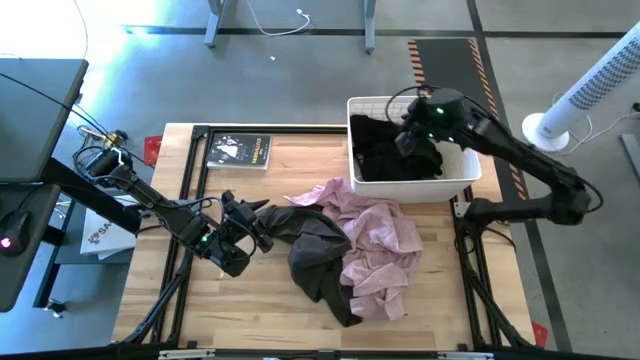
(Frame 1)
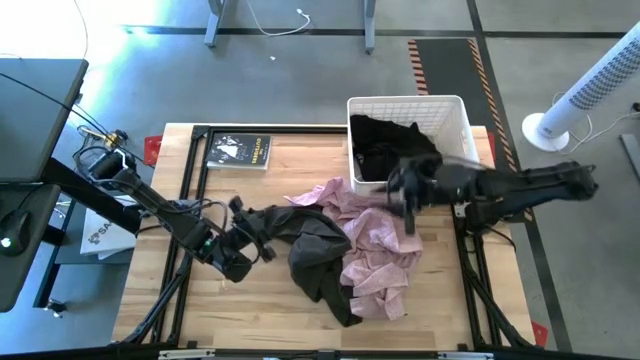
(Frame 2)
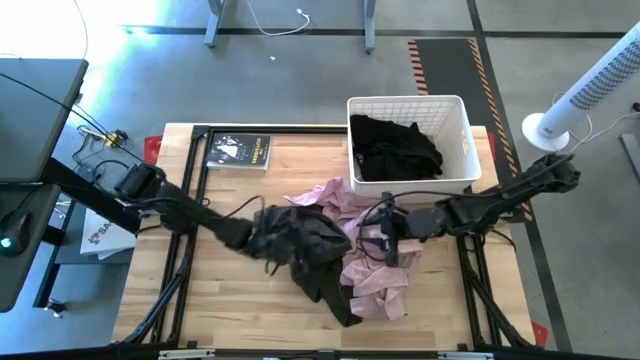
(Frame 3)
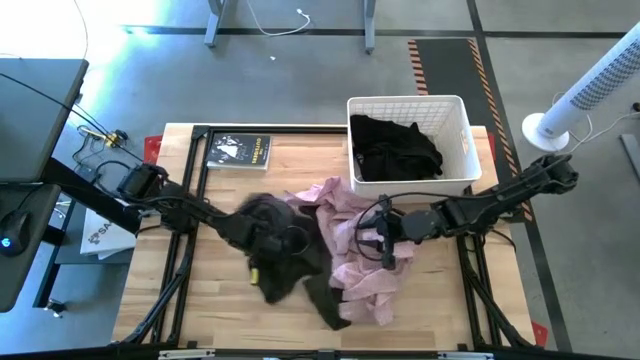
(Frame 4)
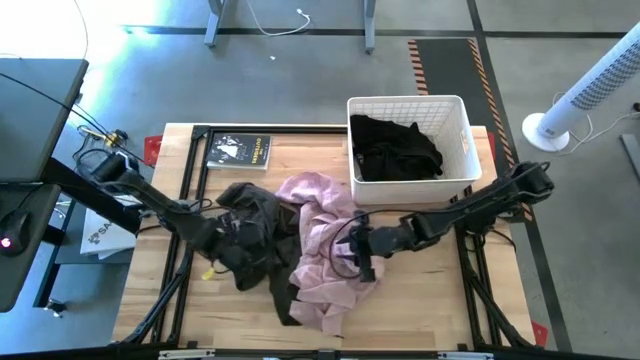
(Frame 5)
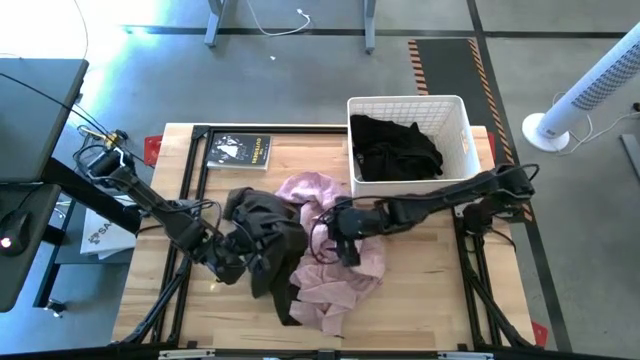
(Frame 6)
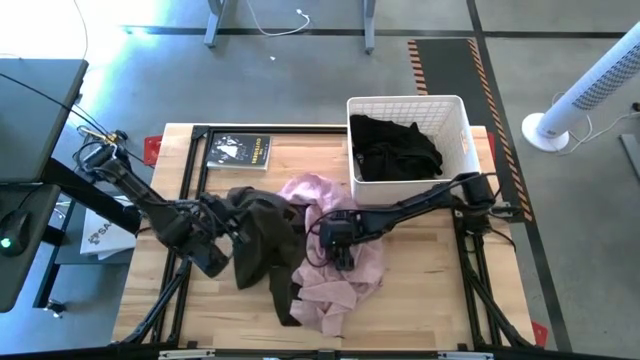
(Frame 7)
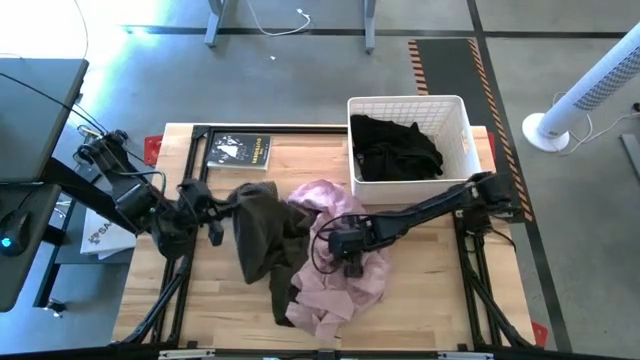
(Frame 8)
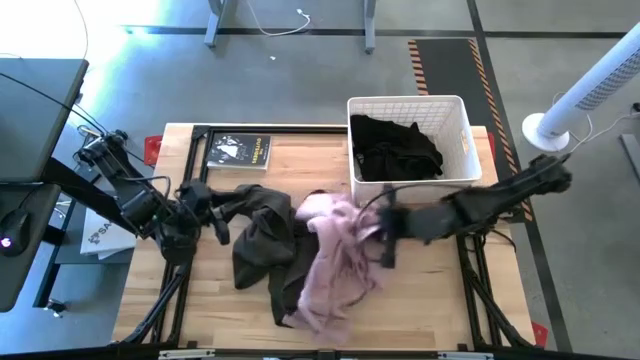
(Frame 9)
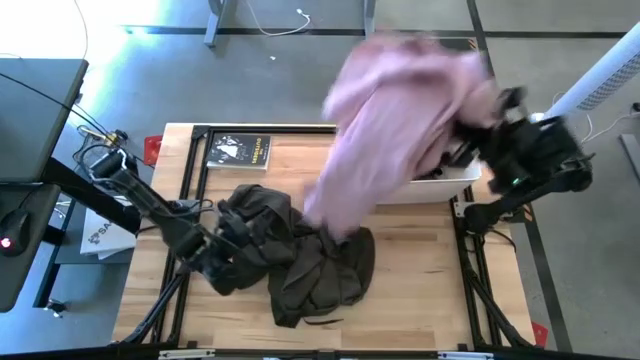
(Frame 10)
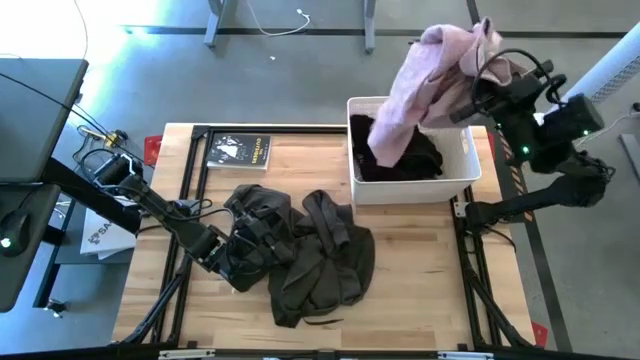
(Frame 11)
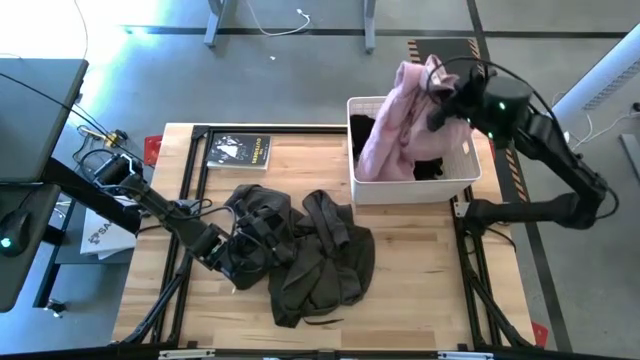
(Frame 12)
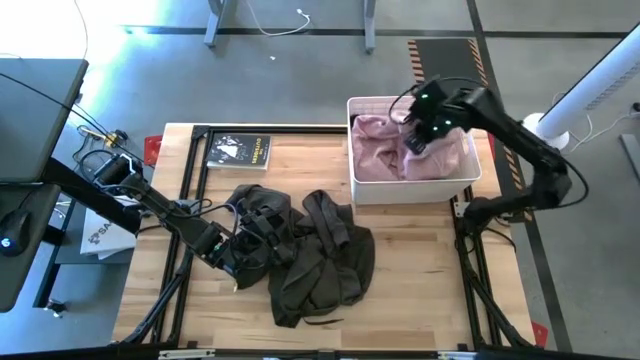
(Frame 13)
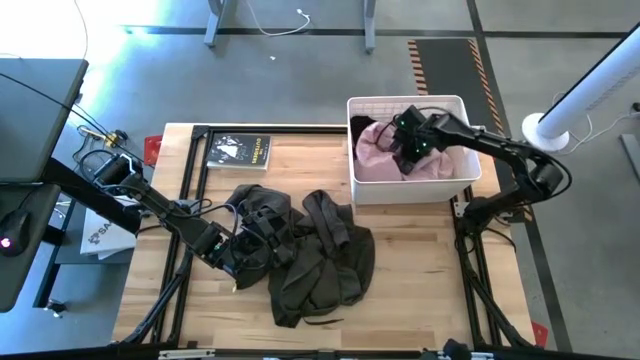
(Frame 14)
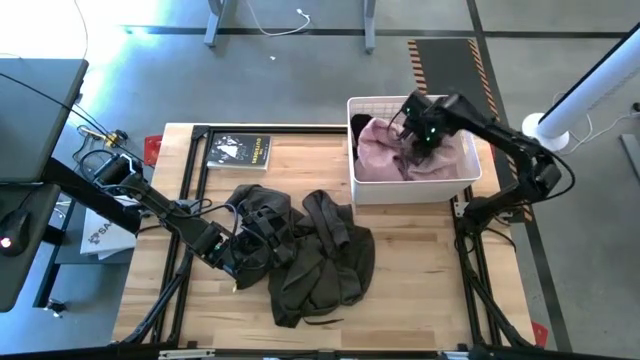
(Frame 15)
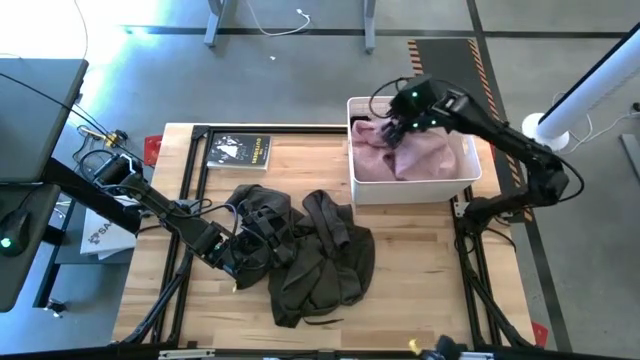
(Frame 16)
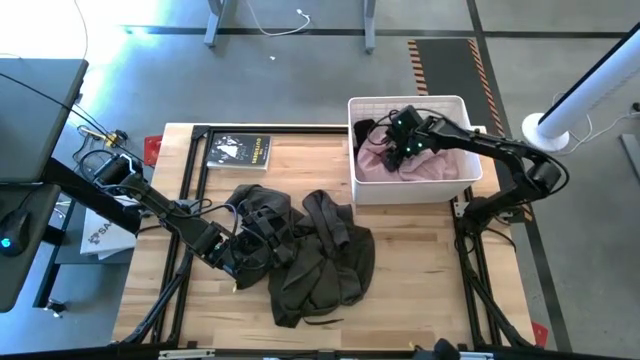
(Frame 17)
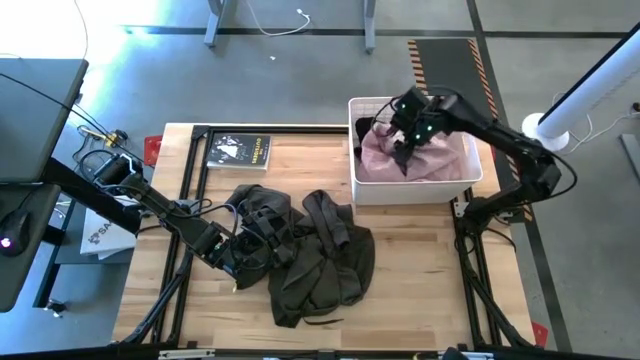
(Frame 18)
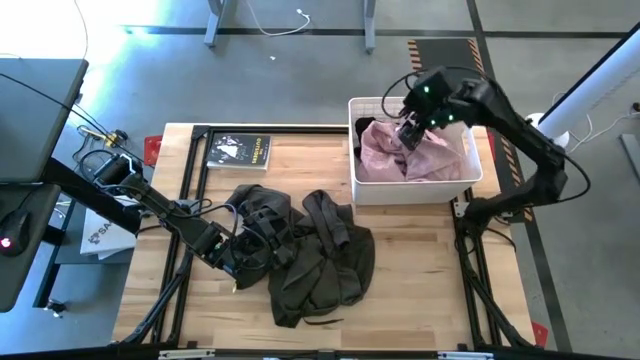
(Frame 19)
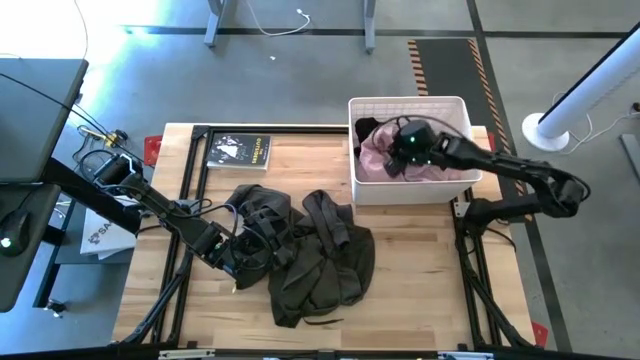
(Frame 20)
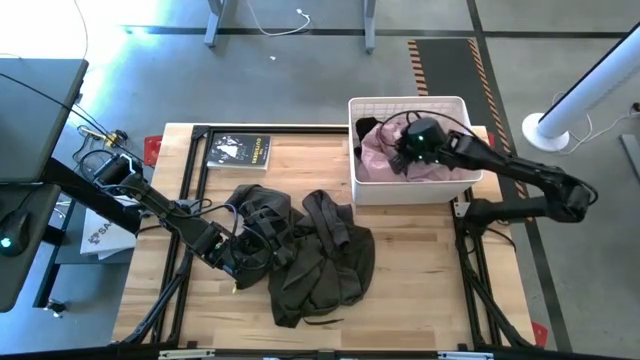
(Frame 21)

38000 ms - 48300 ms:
Task: Sort clothes
Put the pink shirt into the white bin

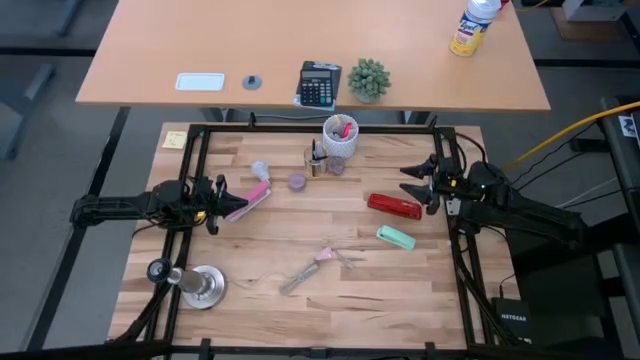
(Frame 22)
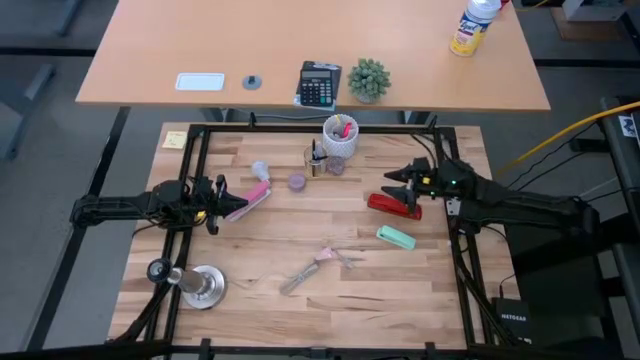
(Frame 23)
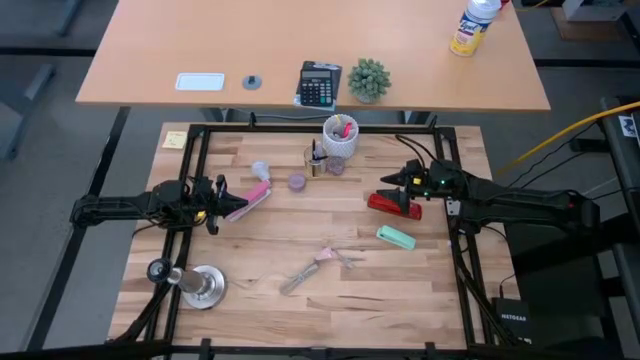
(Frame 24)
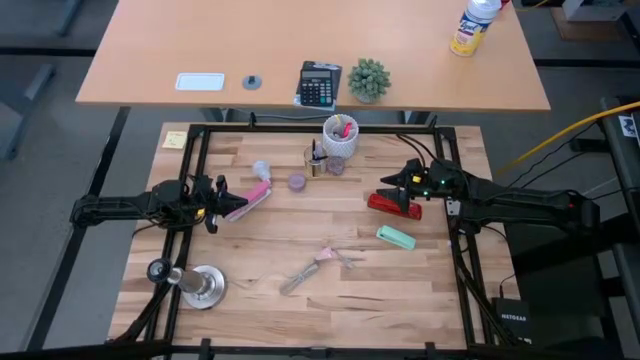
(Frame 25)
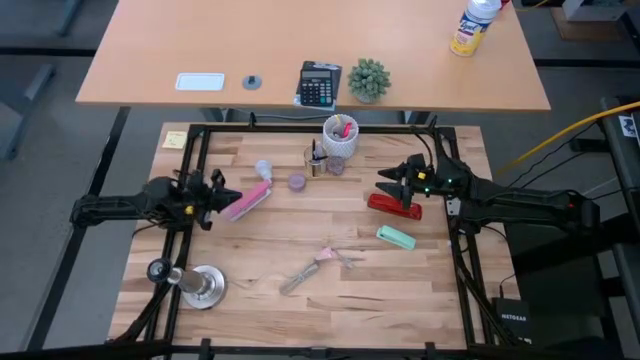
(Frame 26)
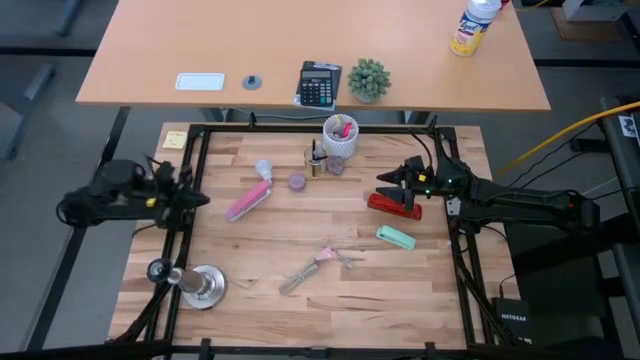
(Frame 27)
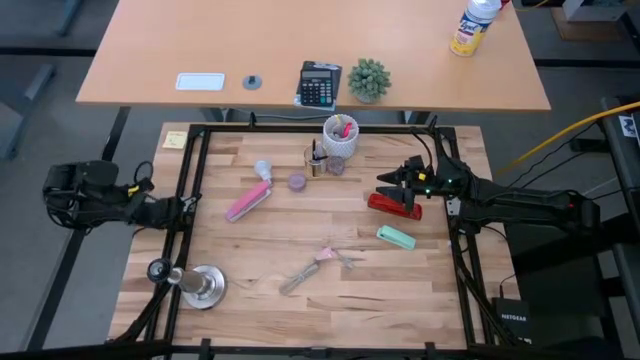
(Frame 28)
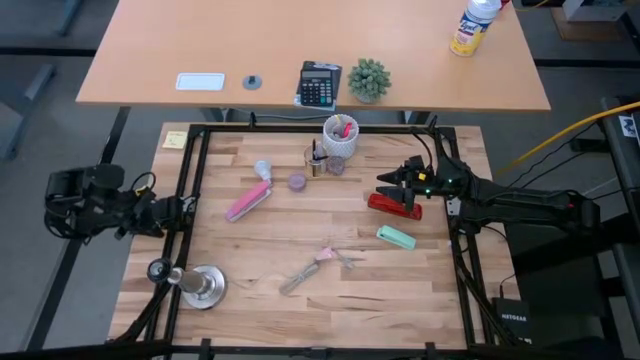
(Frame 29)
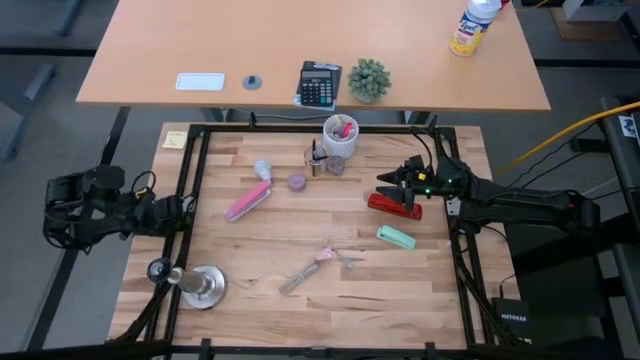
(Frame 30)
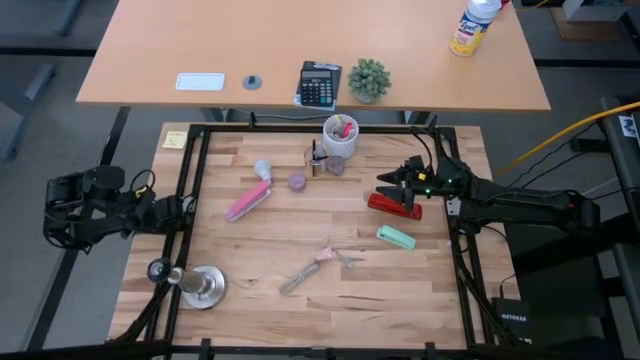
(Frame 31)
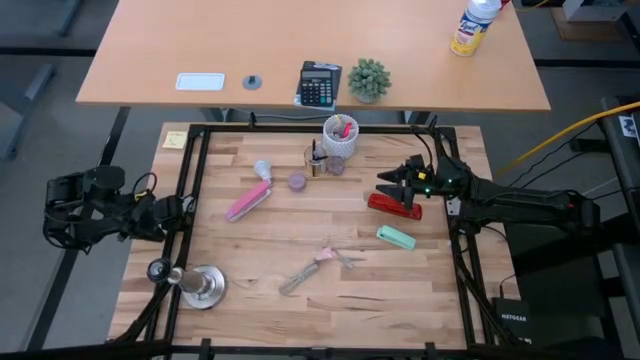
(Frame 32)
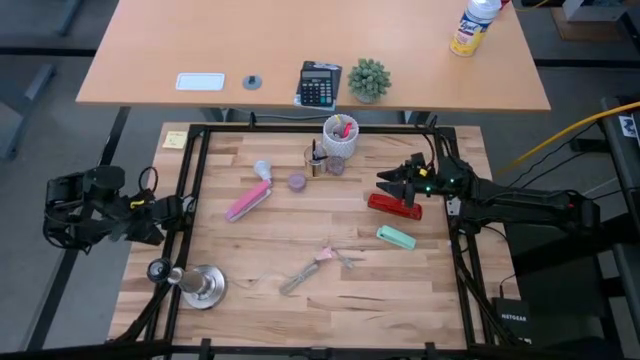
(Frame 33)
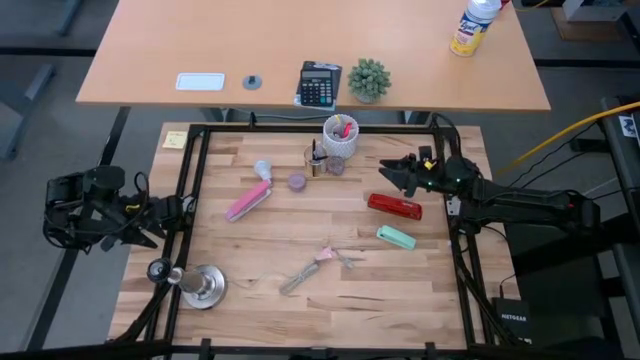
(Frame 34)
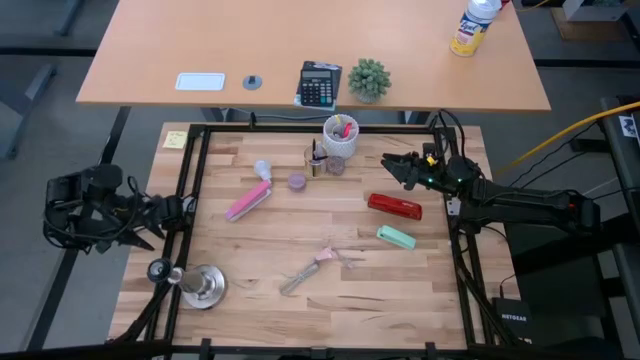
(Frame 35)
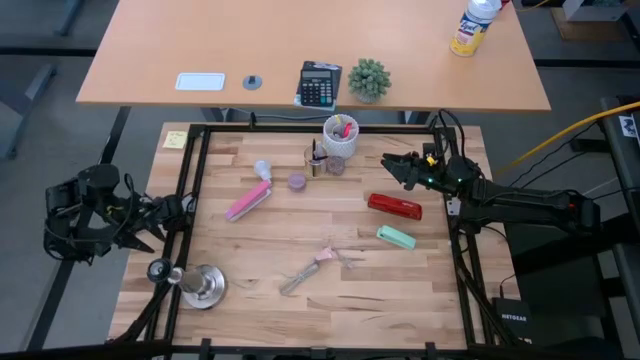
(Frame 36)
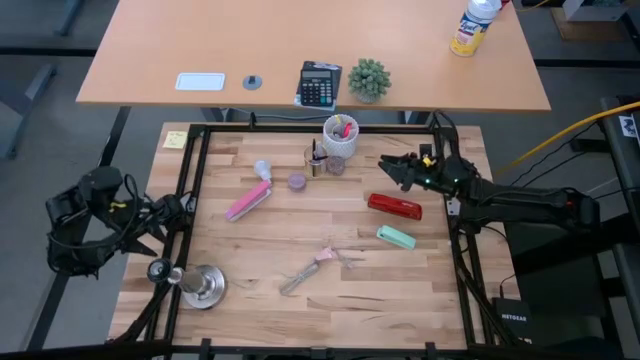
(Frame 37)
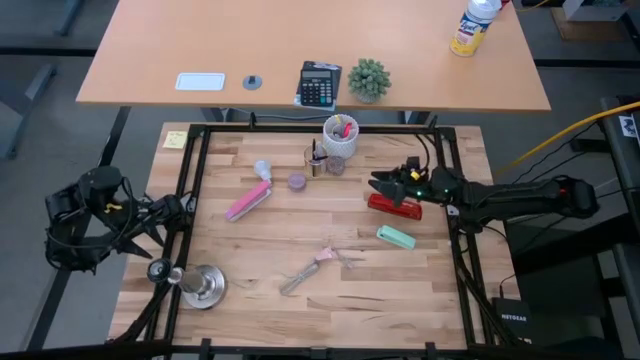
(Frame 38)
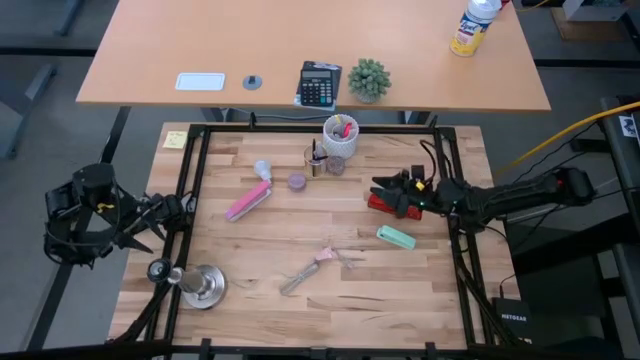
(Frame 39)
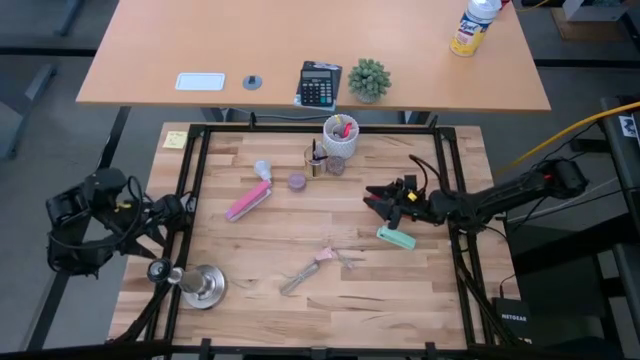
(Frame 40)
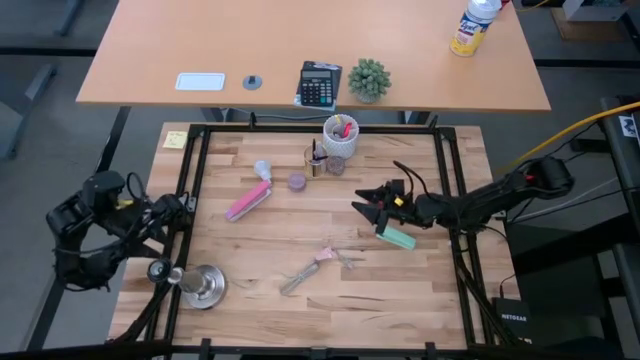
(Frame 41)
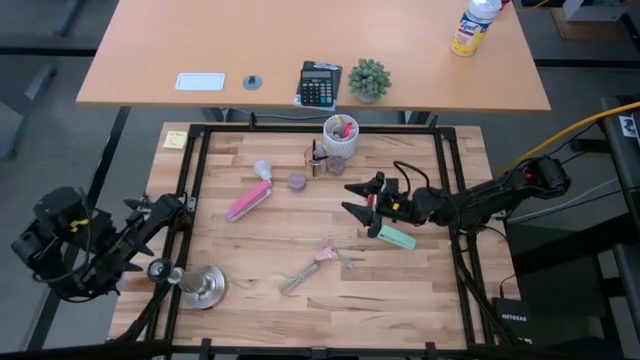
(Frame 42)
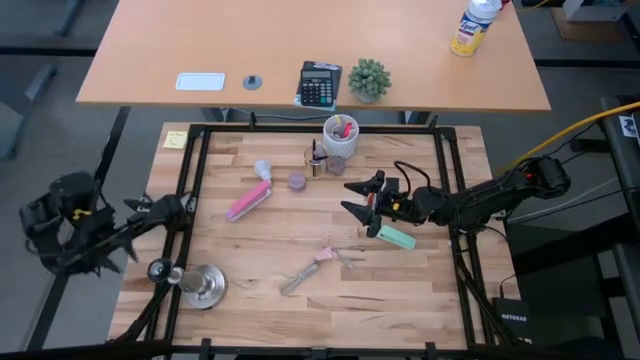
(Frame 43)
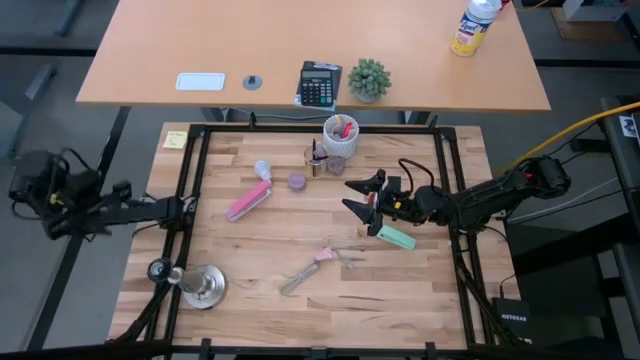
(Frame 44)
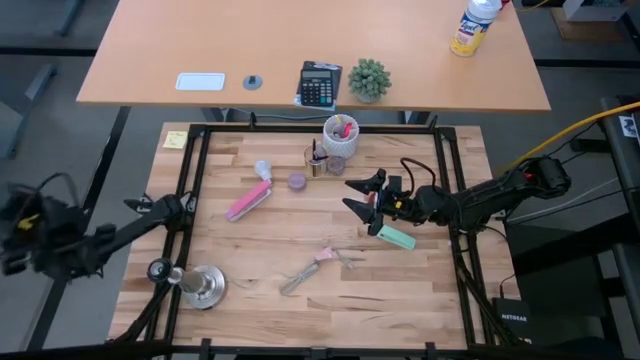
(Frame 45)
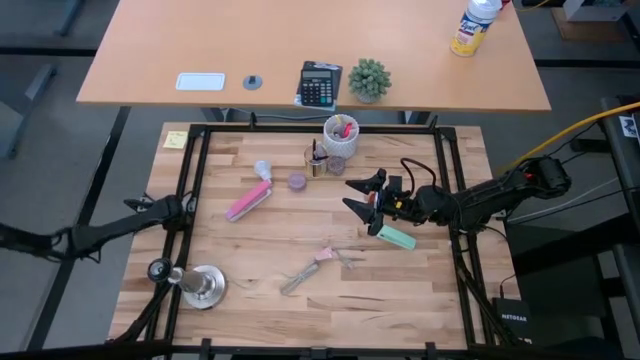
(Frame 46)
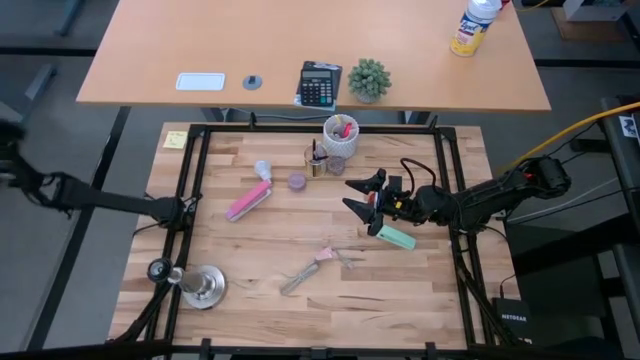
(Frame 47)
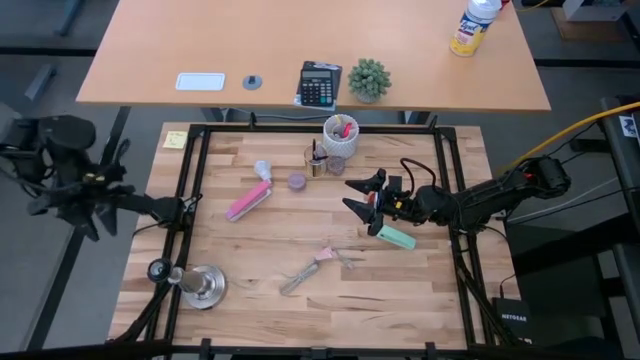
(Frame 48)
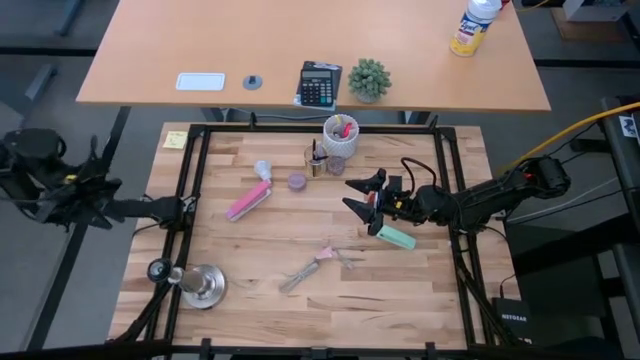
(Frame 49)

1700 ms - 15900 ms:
Task: Screw lightbulb
Move the lamp socket to the center of the table
